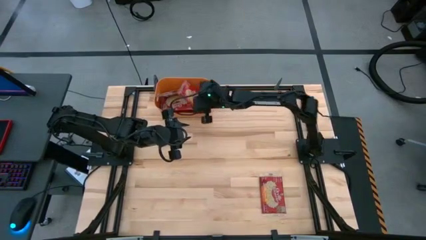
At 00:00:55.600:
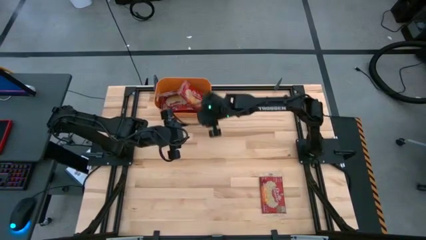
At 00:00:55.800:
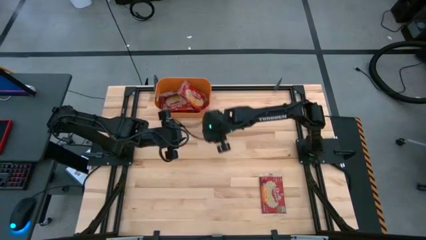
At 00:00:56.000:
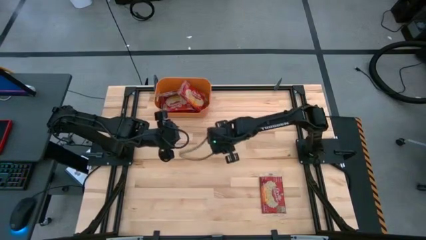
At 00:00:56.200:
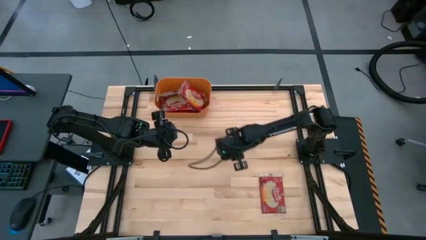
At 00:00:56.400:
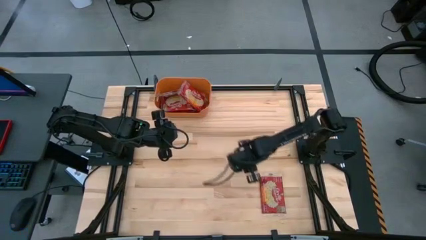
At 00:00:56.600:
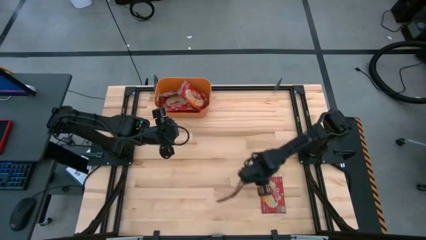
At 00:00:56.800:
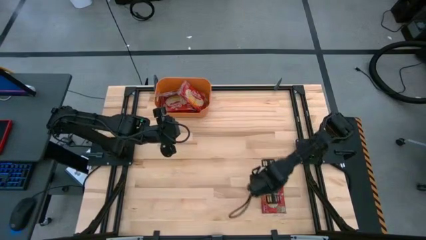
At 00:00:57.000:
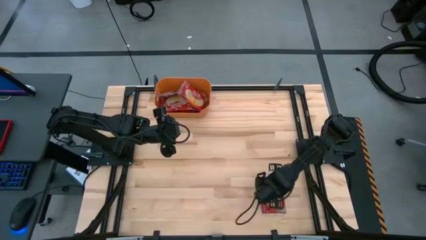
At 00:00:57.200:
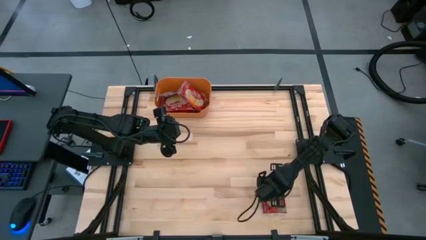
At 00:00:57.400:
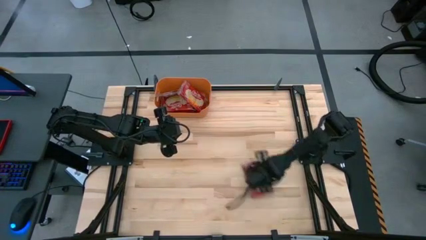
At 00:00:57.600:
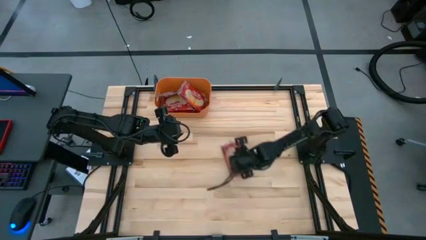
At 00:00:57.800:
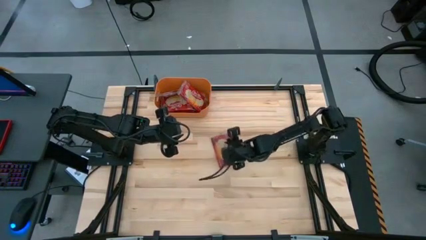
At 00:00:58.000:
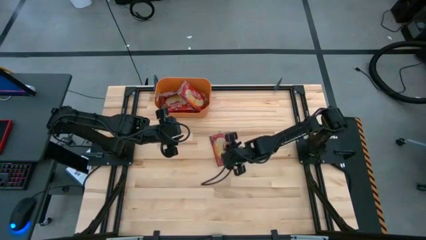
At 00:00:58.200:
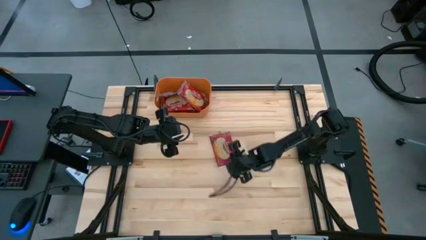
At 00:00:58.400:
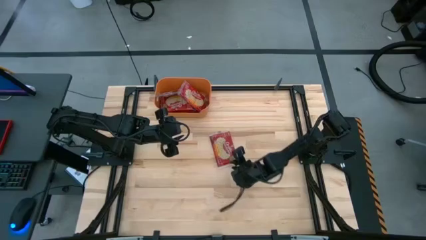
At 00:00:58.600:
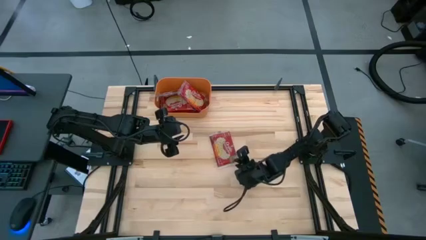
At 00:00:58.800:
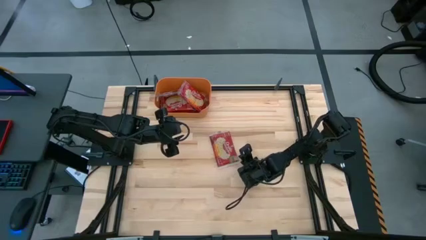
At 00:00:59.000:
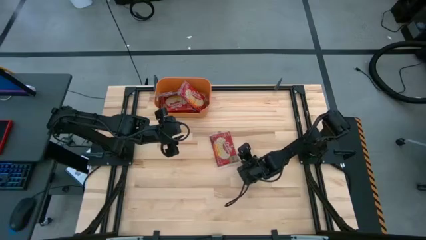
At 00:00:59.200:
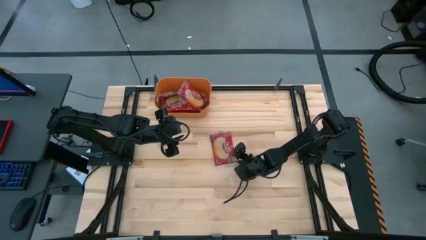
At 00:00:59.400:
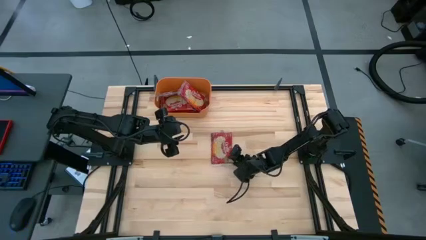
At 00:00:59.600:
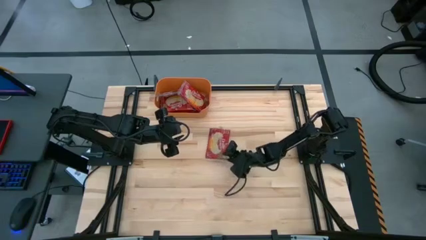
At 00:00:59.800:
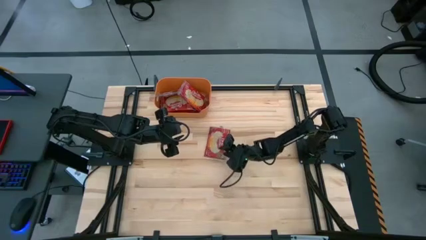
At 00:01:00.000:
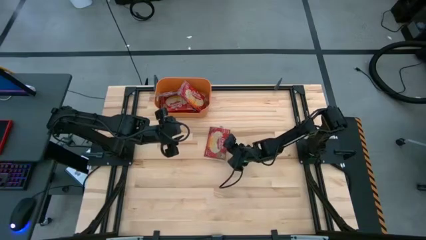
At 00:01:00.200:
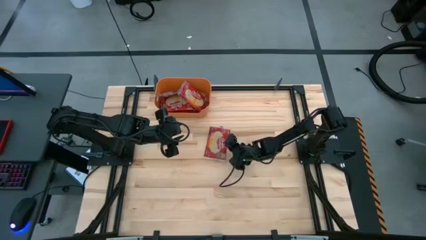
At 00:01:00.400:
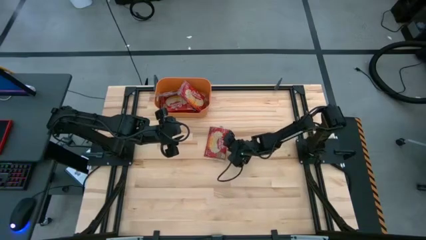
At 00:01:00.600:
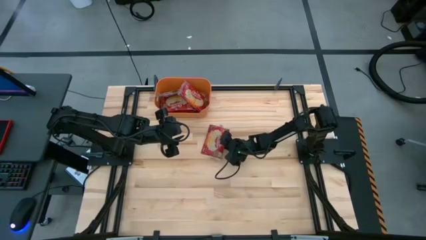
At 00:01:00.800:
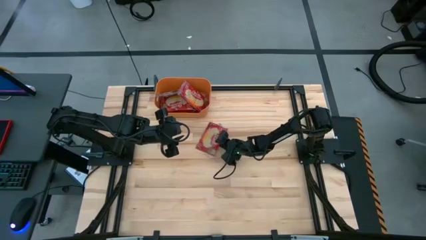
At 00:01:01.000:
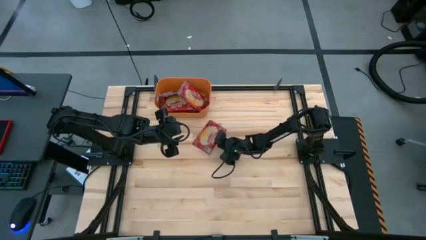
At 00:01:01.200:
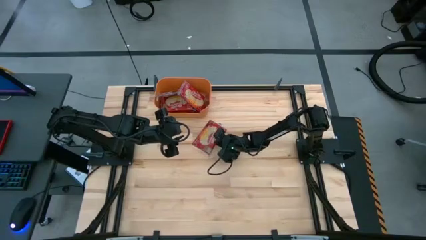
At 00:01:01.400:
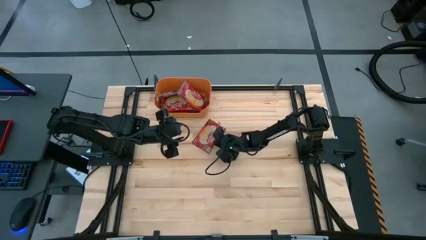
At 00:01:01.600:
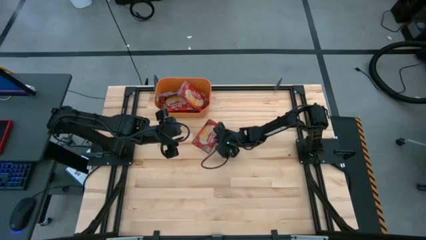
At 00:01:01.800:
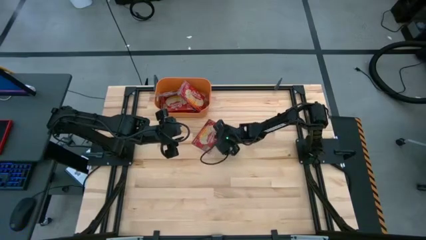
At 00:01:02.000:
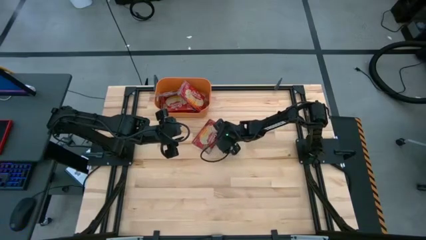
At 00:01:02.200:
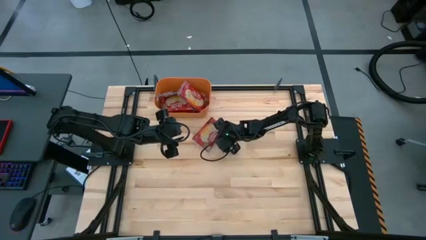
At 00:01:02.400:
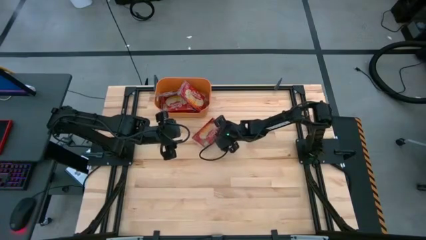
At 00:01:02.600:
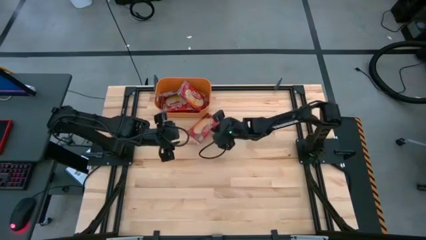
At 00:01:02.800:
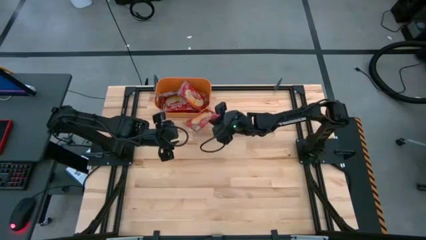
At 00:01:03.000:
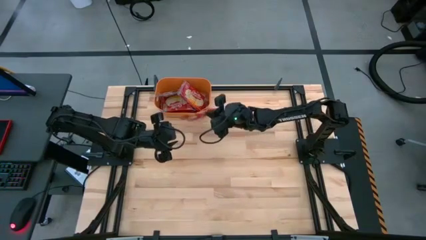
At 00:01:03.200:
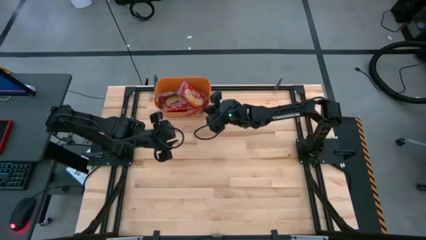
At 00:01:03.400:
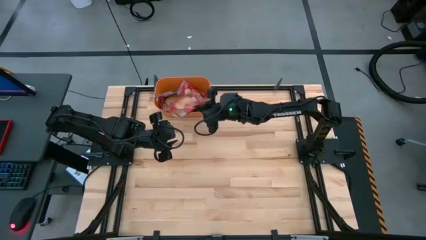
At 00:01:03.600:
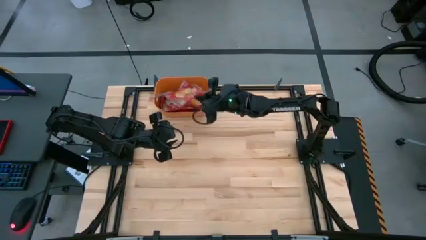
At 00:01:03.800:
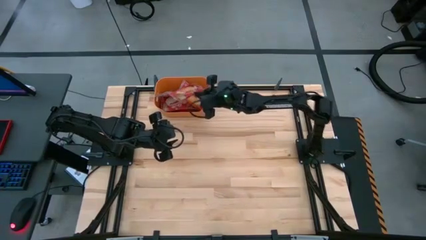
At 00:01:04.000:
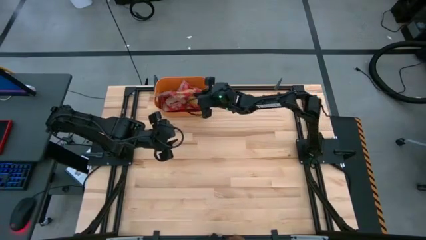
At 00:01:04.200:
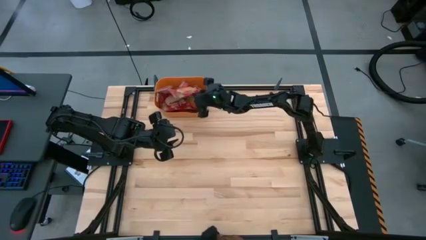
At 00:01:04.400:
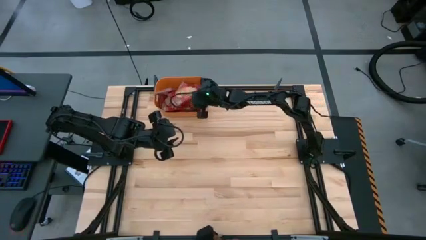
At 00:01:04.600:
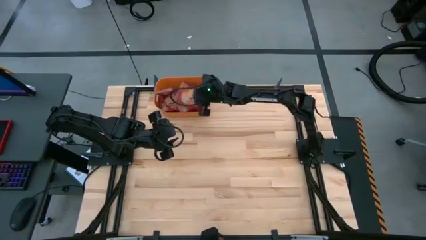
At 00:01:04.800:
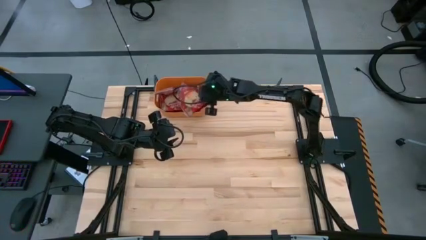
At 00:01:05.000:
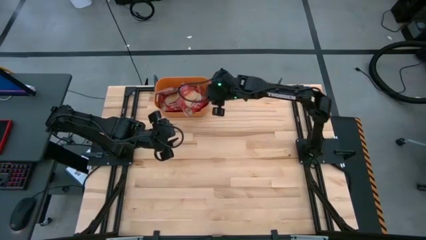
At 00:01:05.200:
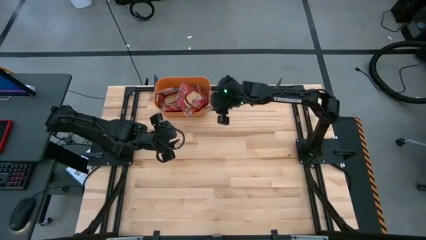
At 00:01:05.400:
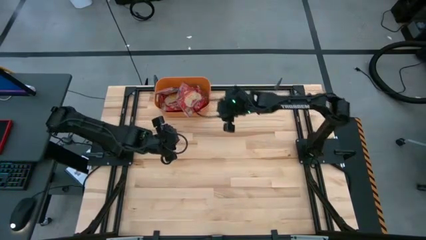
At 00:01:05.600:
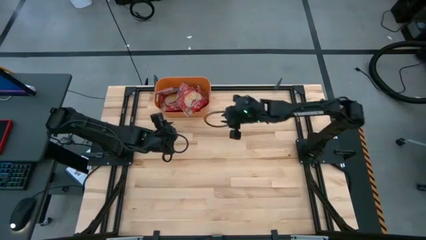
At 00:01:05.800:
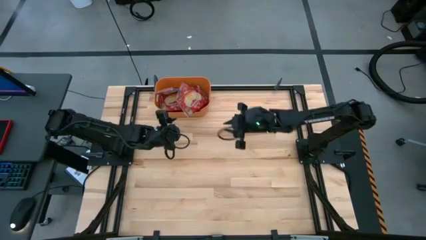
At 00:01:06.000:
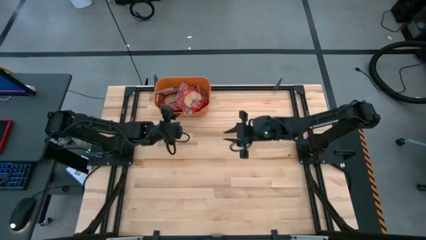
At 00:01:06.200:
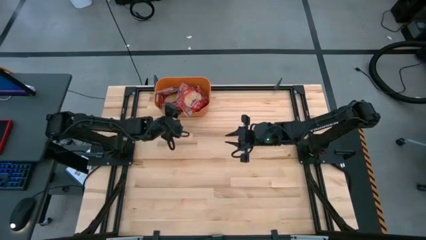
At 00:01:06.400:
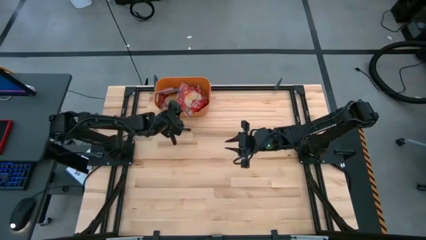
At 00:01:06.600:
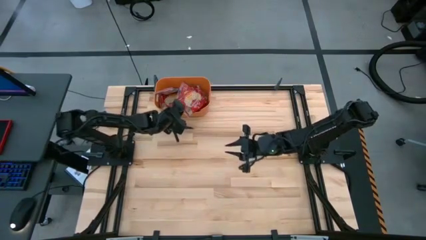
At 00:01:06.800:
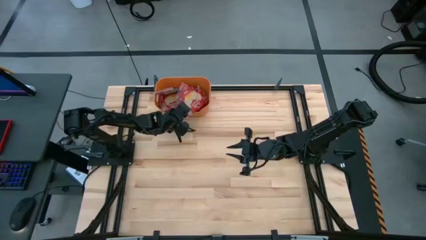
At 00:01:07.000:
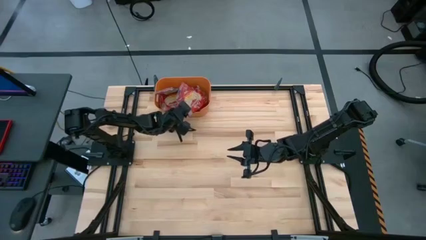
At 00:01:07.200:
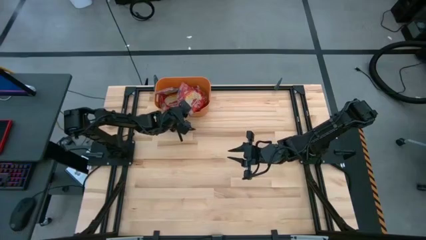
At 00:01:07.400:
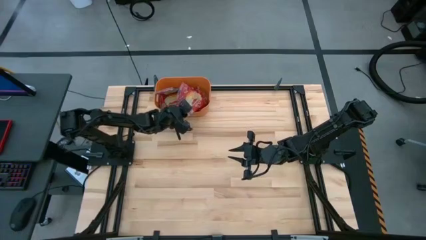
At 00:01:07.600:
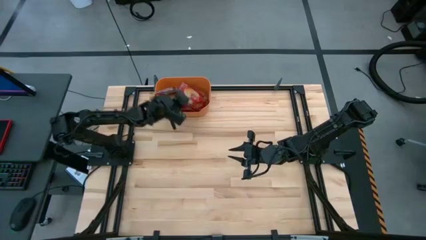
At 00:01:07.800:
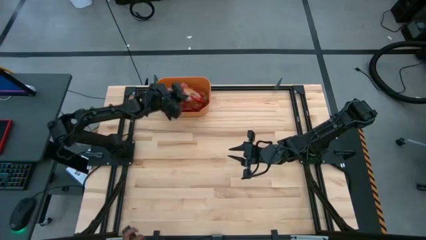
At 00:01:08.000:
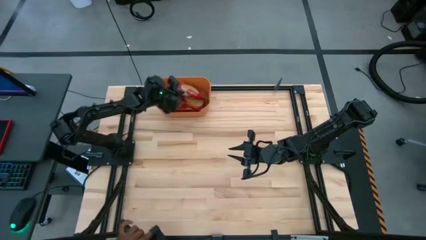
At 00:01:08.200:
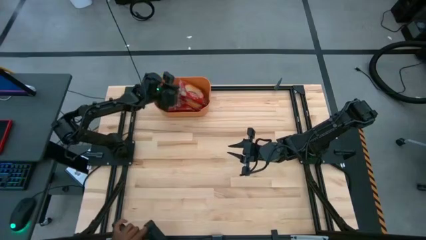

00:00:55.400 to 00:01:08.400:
Task: Sort popcorn bags into baskets
Put the popcorn bag into the orange bin

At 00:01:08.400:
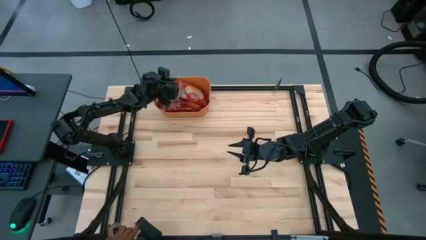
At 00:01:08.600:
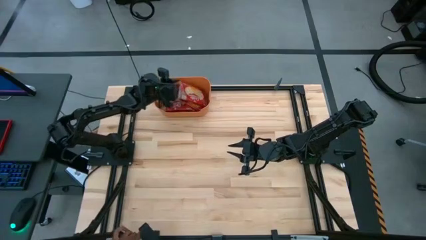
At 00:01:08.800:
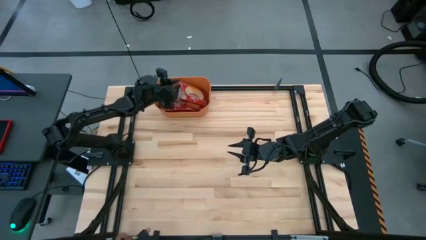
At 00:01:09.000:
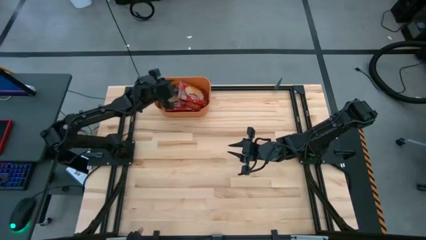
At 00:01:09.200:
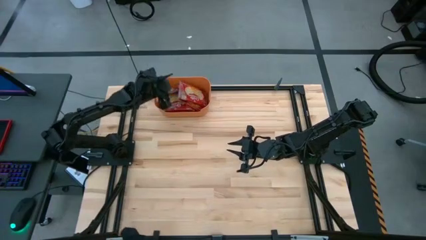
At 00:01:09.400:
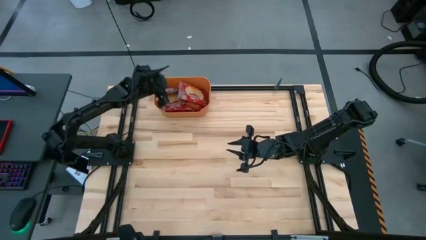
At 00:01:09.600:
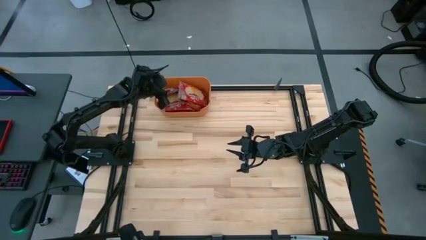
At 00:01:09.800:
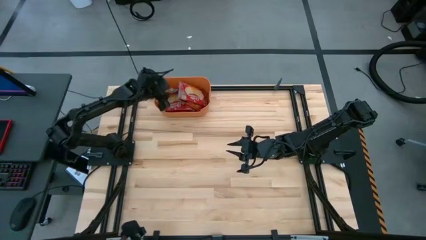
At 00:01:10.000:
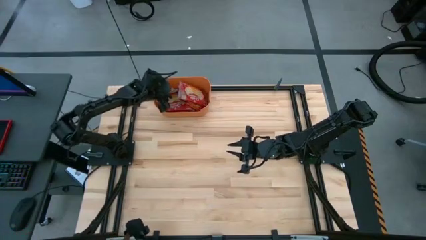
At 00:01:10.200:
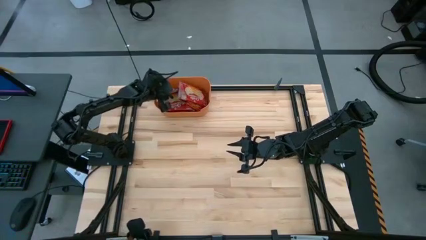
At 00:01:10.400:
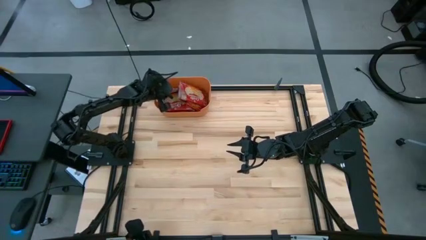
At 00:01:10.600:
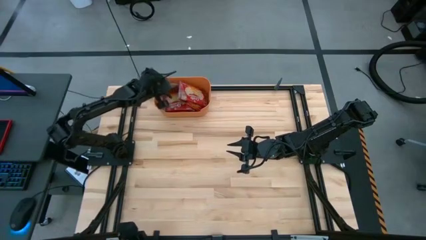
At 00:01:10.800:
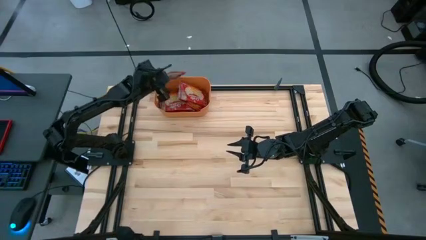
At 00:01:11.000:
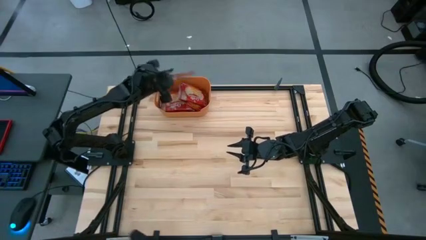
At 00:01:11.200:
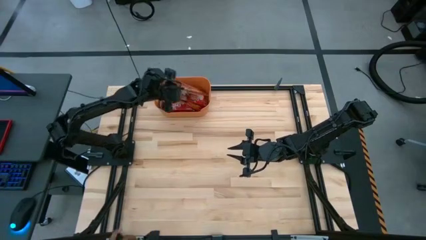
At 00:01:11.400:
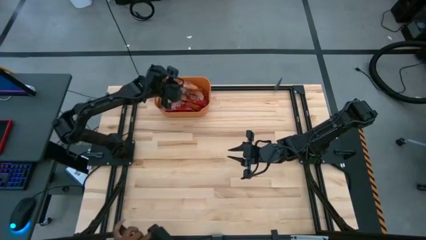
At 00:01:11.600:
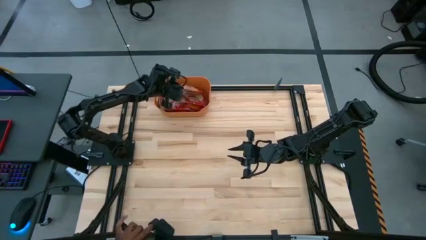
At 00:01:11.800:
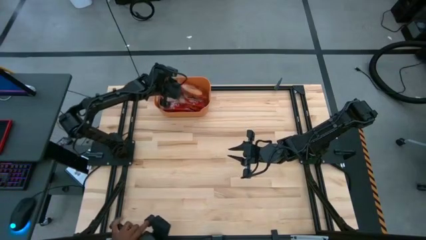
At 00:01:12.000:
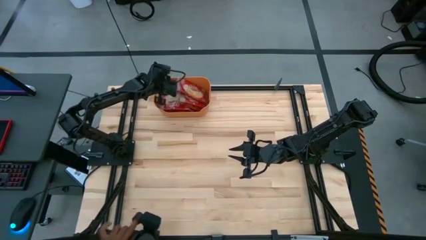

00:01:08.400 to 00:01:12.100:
Adjust the popcorn bag in the orange bin
